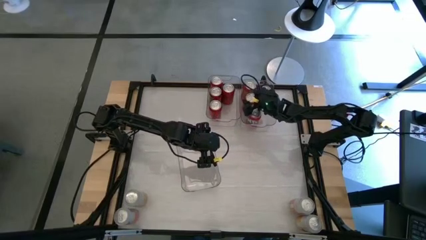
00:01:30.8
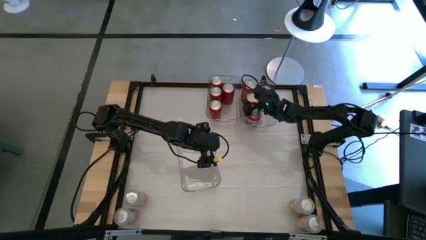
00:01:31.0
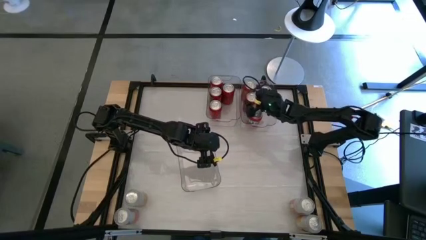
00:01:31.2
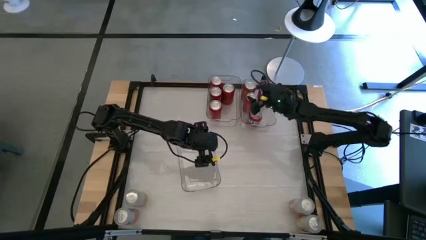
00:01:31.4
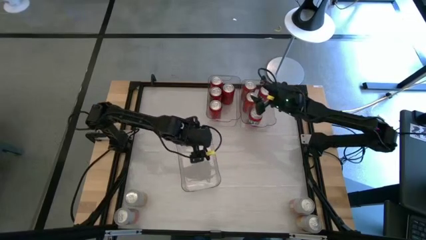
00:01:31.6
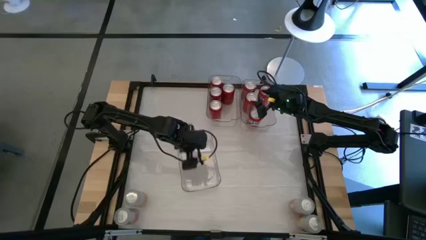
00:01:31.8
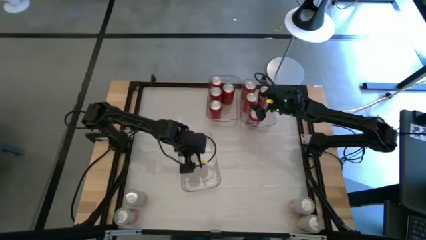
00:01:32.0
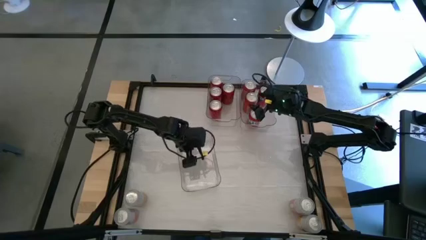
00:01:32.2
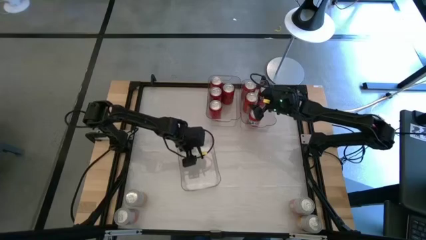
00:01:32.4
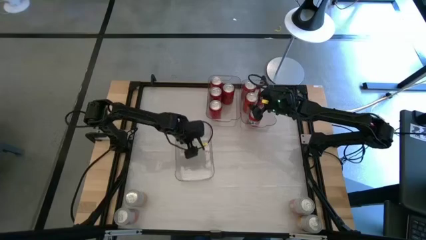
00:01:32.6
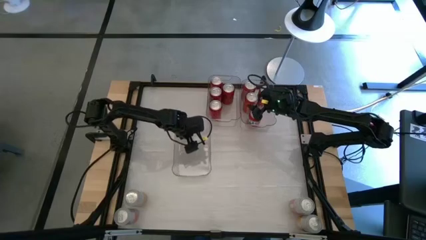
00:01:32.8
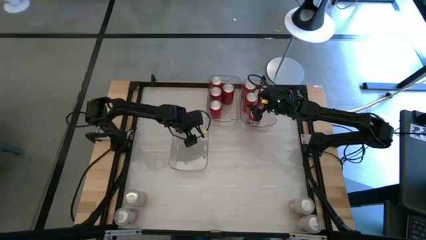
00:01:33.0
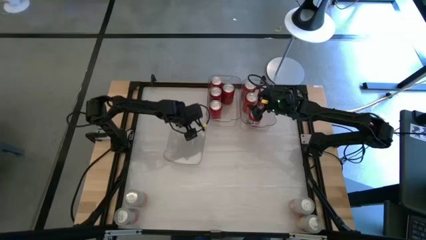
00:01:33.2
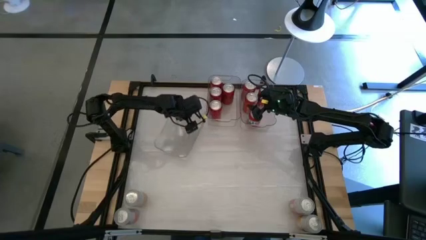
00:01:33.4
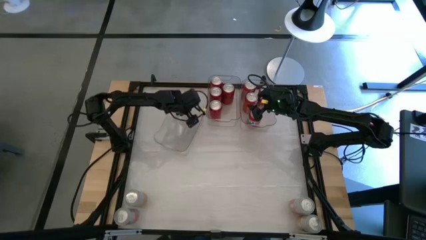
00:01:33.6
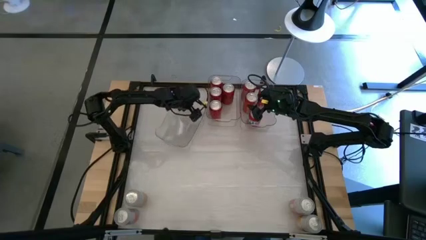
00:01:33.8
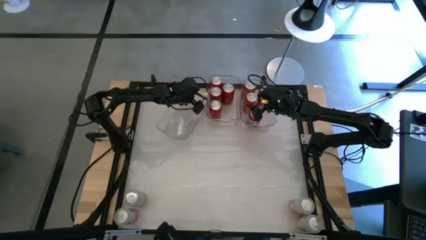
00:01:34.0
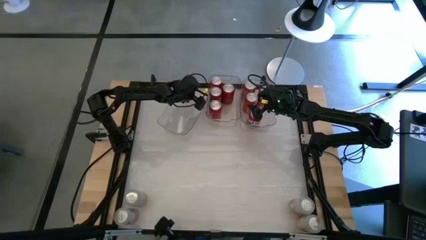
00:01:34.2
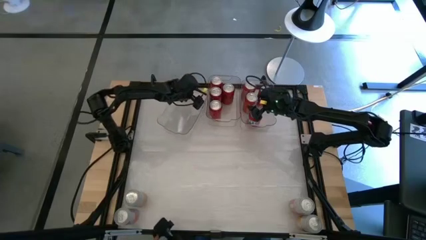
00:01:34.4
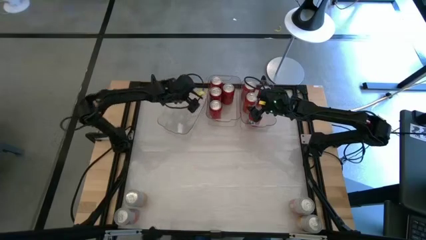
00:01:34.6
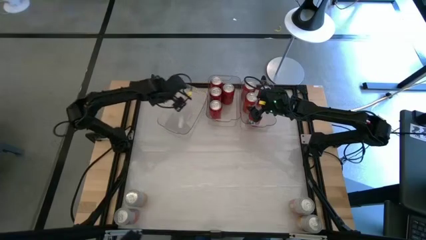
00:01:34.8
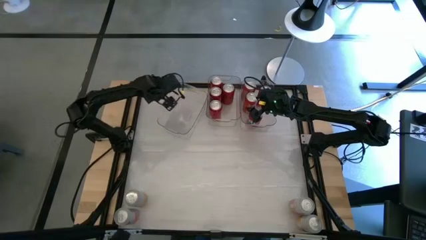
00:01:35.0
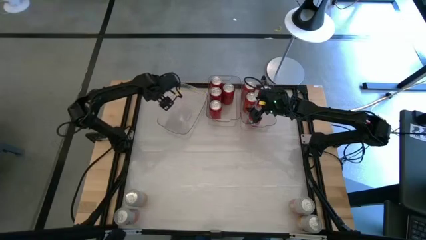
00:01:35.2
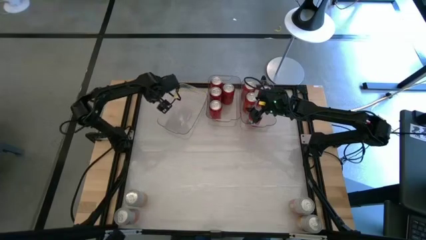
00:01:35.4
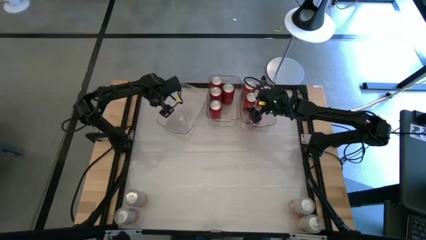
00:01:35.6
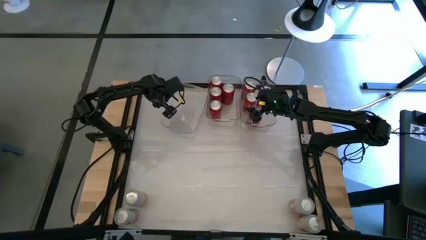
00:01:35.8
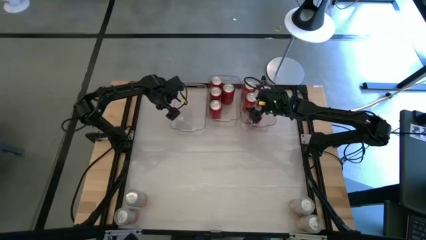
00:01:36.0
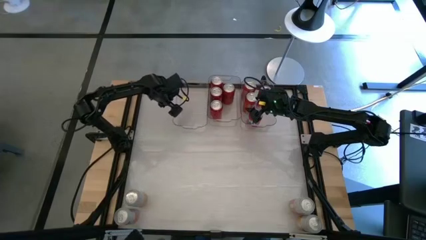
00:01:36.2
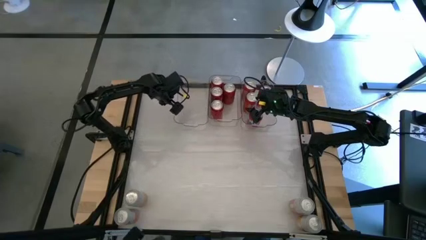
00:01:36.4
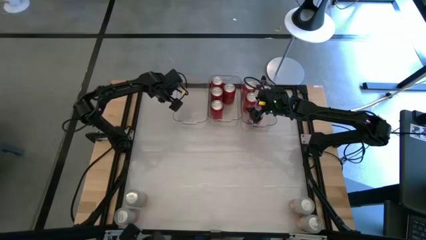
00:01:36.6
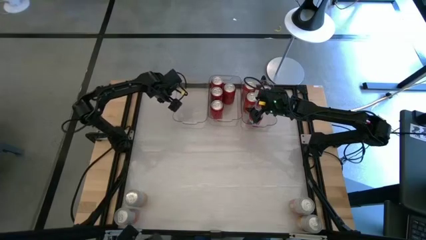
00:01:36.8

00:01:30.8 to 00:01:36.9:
Task: Sort soda cans
Move the bottom transparent bin to the top left of the table

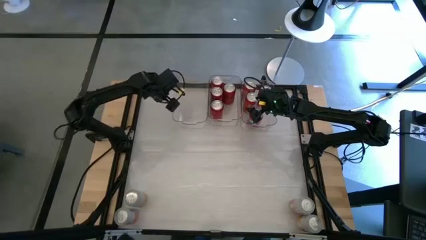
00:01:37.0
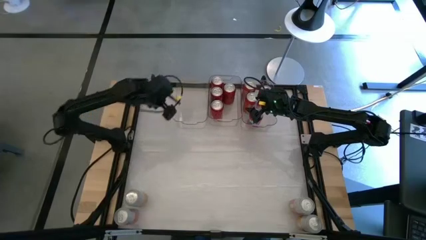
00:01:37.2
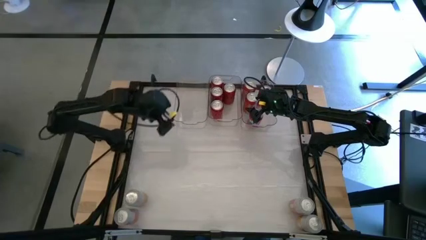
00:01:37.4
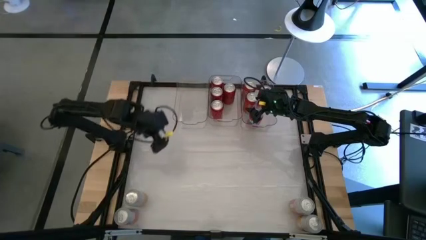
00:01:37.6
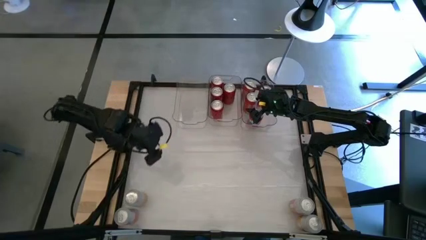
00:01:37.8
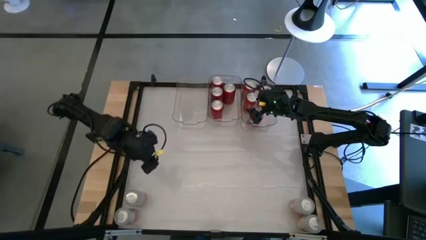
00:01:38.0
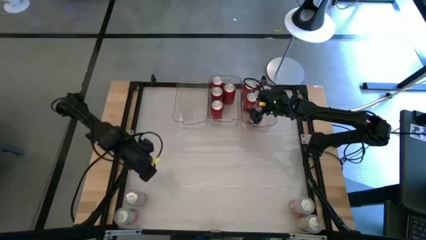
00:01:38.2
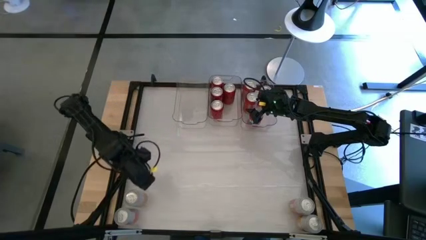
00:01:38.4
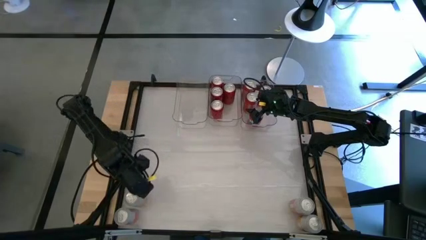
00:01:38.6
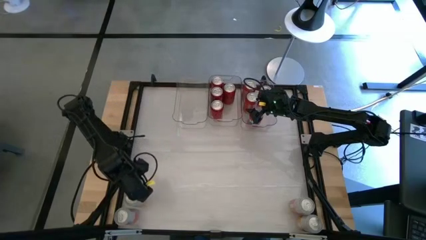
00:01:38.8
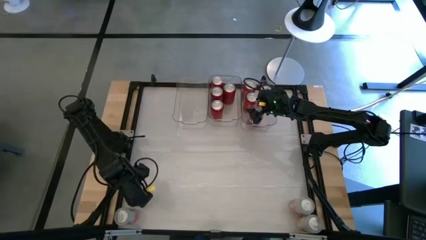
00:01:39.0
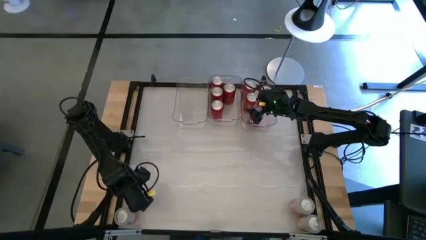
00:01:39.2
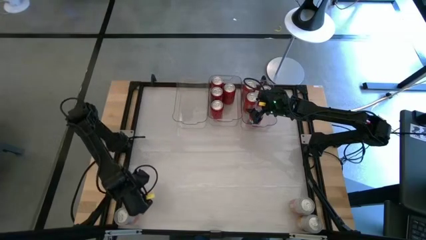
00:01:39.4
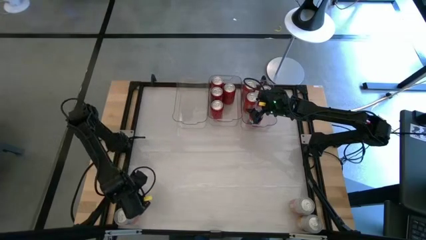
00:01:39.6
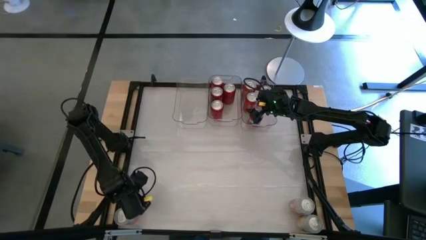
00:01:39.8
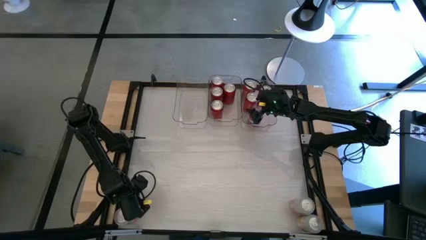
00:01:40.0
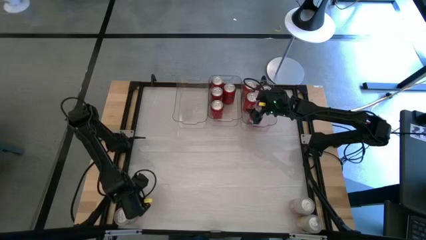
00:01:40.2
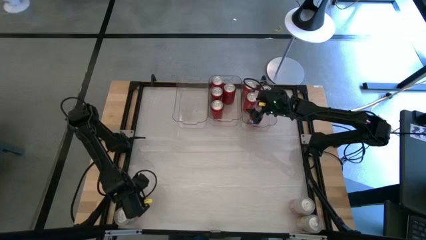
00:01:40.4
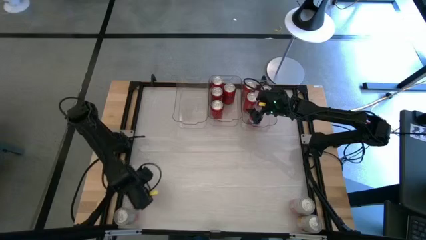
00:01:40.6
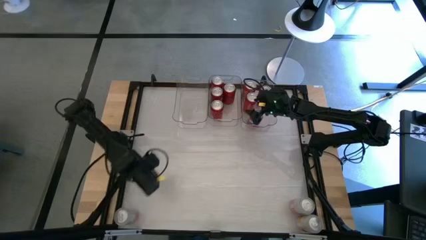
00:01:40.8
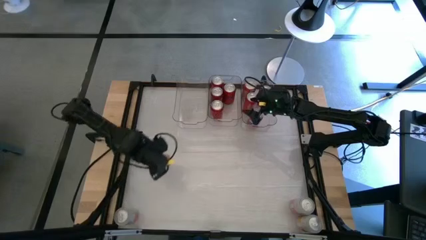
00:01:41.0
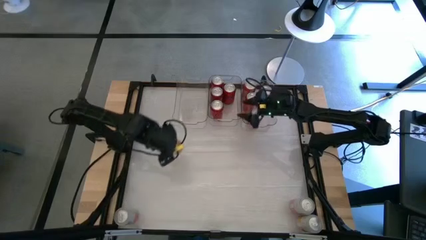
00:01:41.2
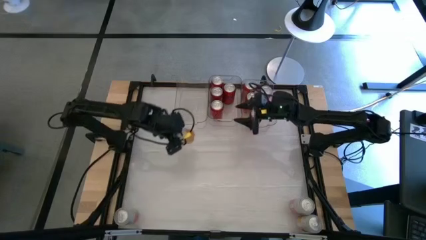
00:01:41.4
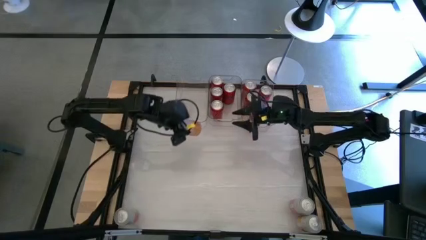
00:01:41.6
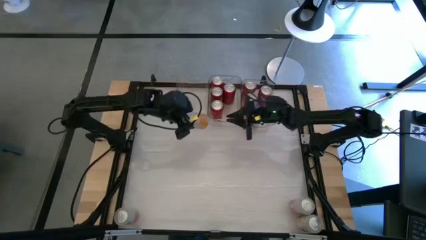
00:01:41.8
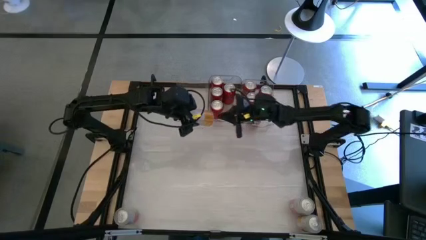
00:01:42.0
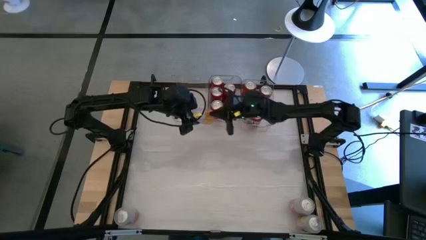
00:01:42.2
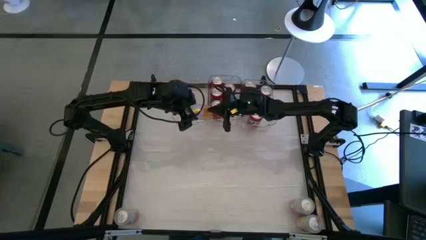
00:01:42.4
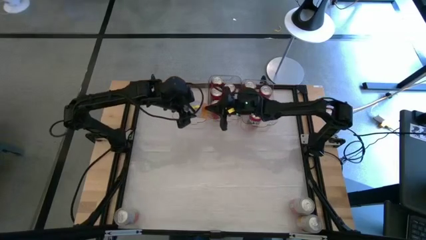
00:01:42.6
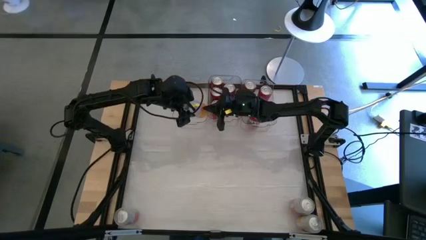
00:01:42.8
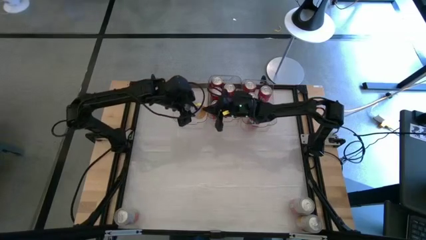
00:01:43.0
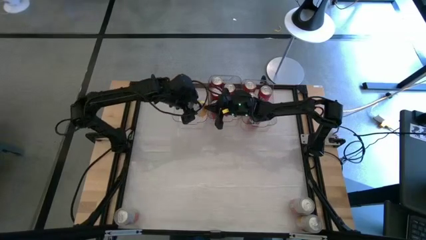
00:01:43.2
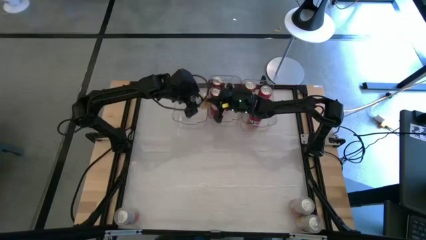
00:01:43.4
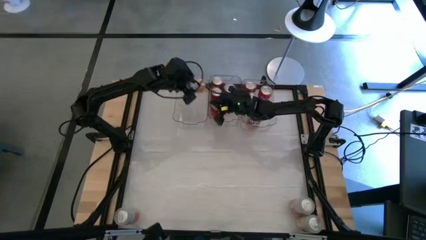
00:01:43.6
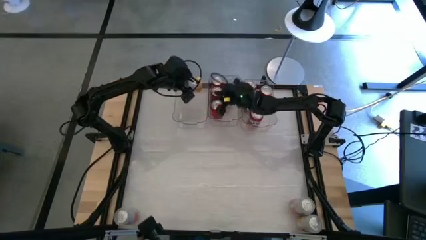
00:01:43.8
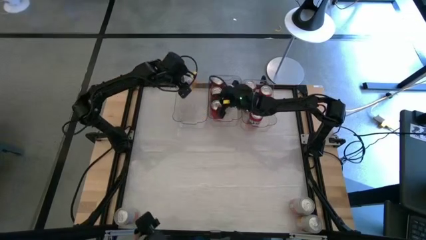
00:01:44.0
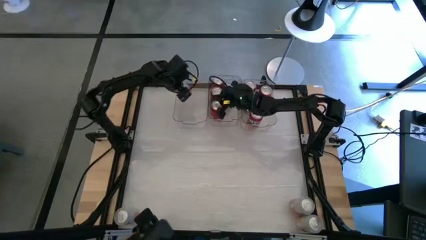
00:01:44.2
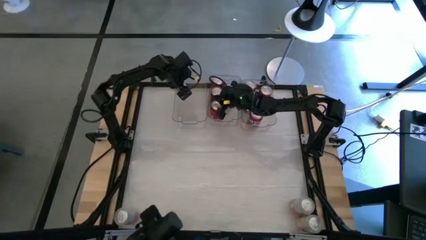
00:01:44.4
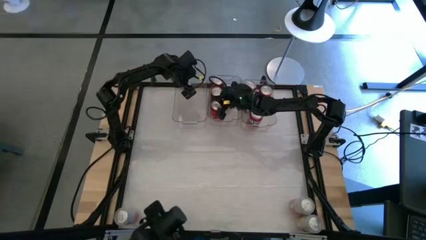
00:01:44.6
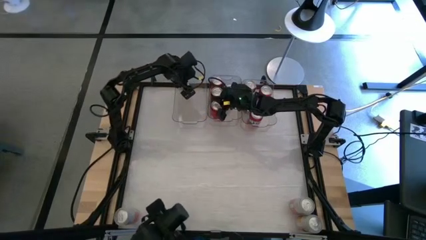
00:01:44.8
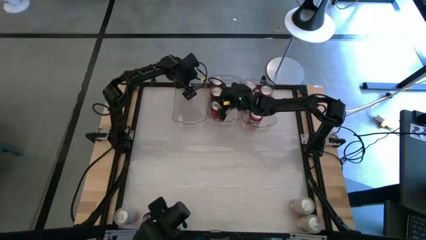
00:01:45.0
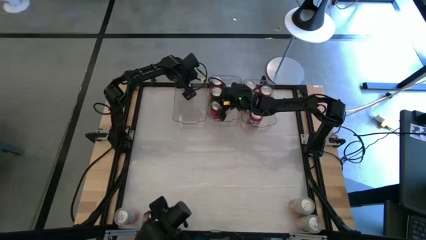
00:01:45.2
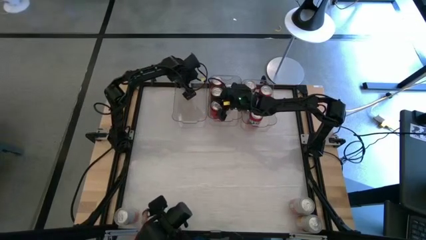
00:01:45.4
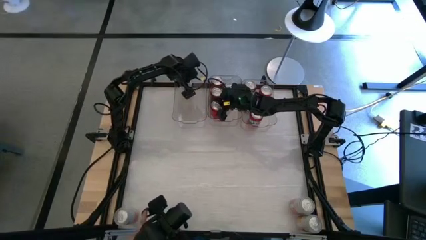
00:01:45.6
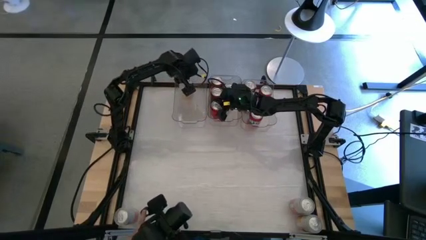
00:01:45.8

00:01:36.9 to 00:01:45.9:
Put the bottom left yellow-white soda can into the left transparent bin
